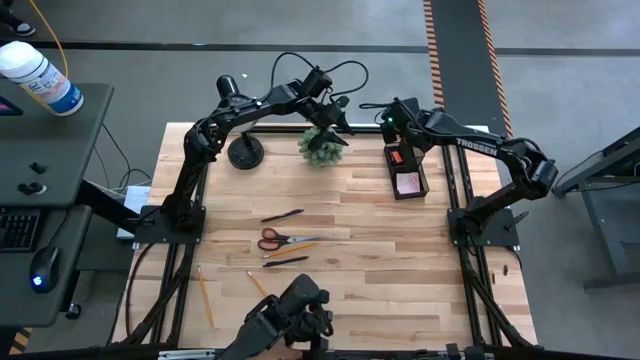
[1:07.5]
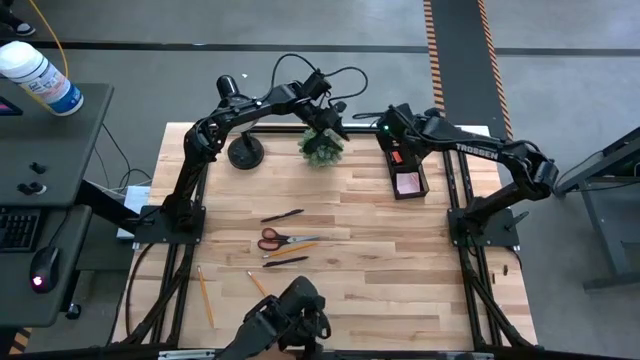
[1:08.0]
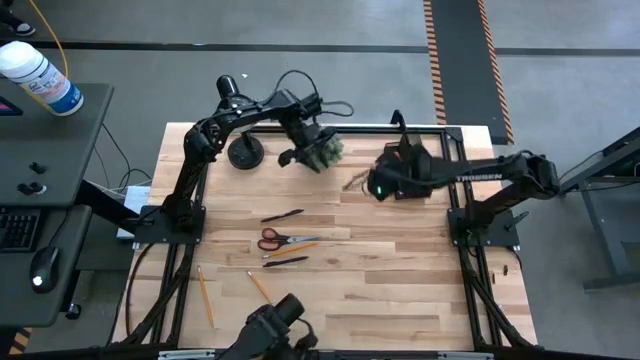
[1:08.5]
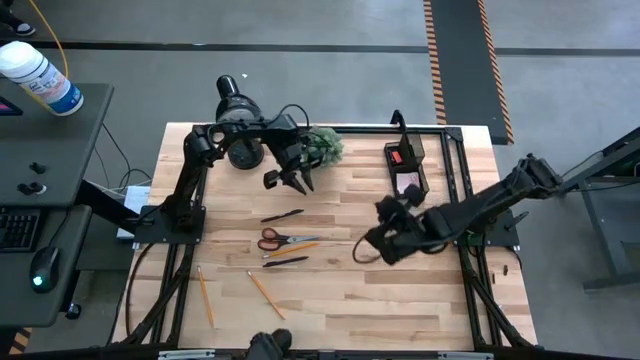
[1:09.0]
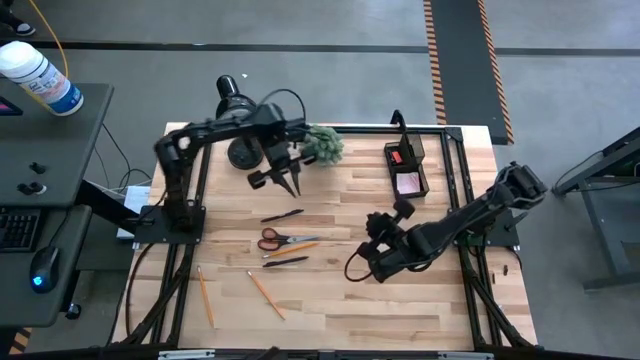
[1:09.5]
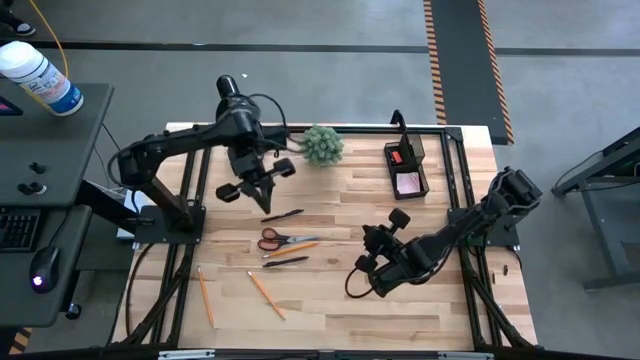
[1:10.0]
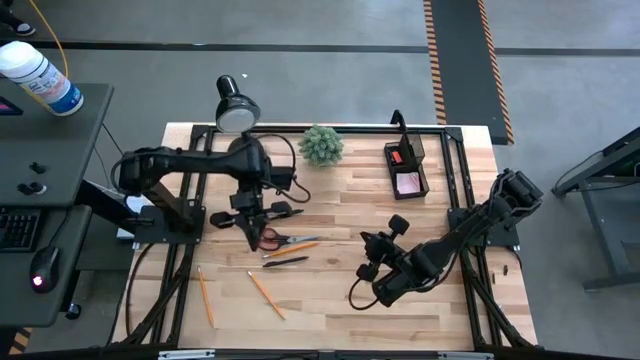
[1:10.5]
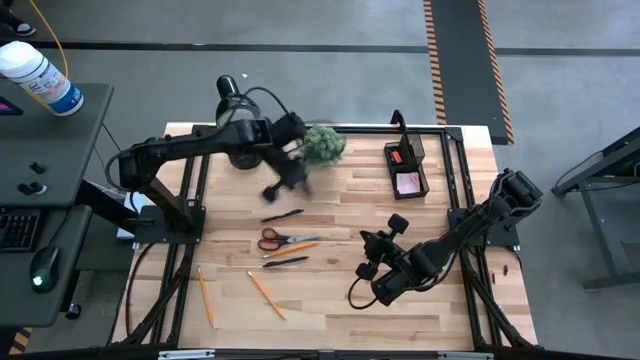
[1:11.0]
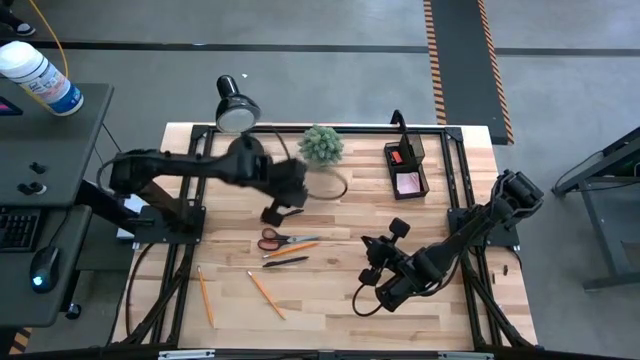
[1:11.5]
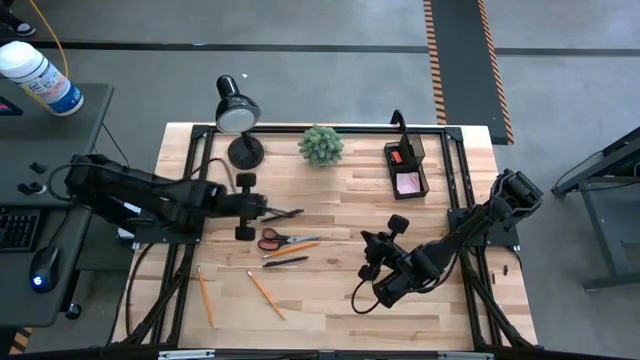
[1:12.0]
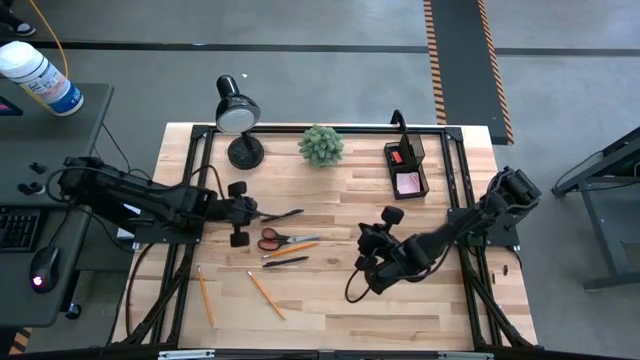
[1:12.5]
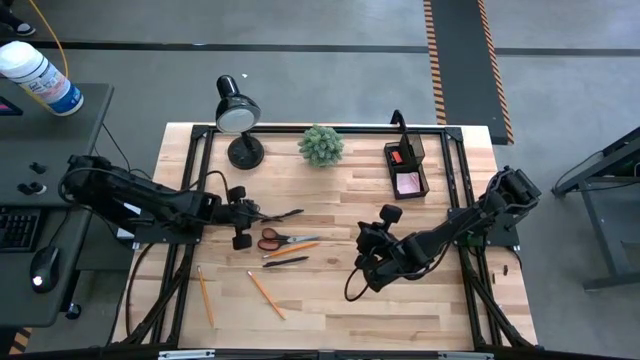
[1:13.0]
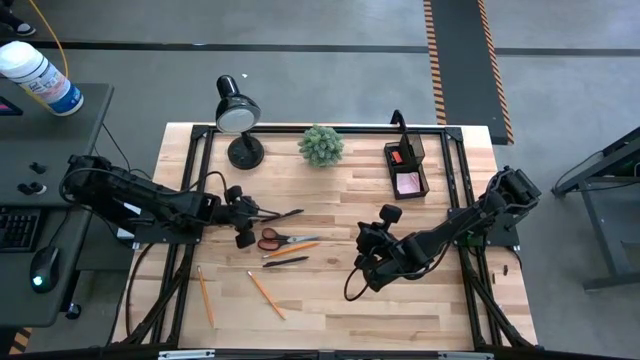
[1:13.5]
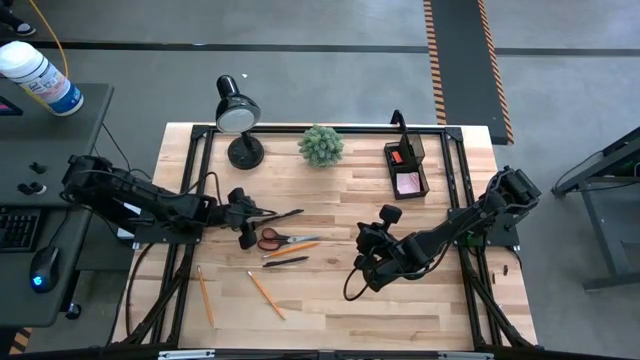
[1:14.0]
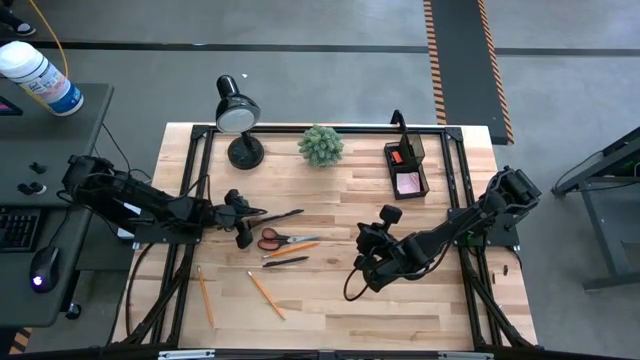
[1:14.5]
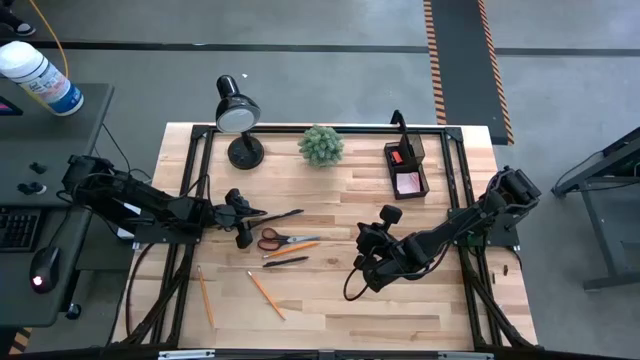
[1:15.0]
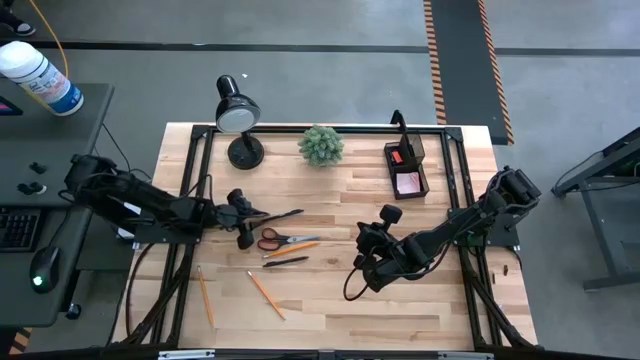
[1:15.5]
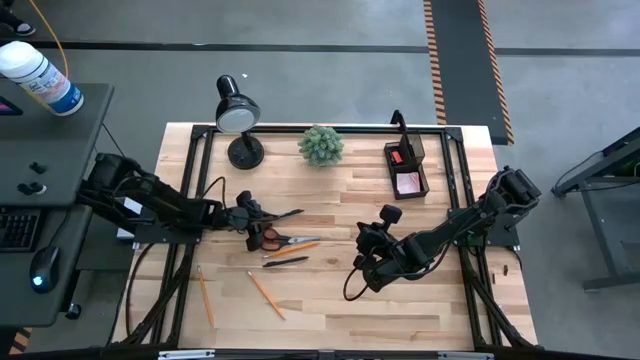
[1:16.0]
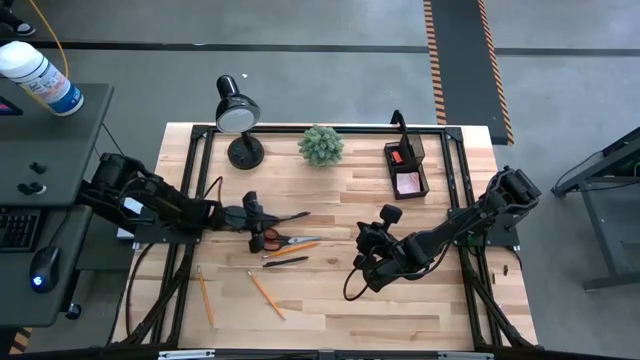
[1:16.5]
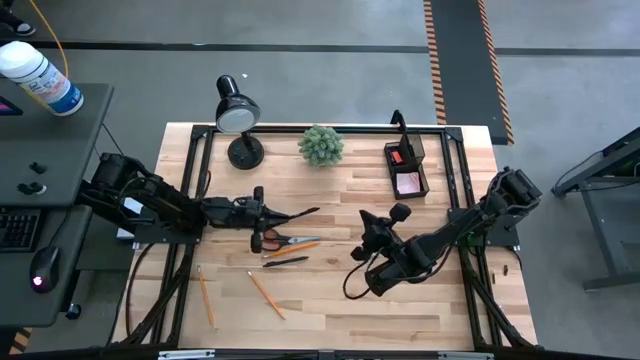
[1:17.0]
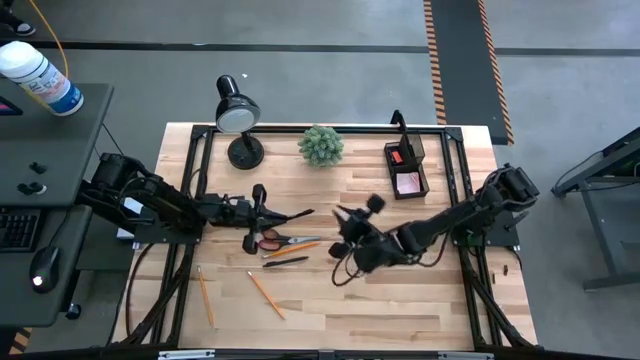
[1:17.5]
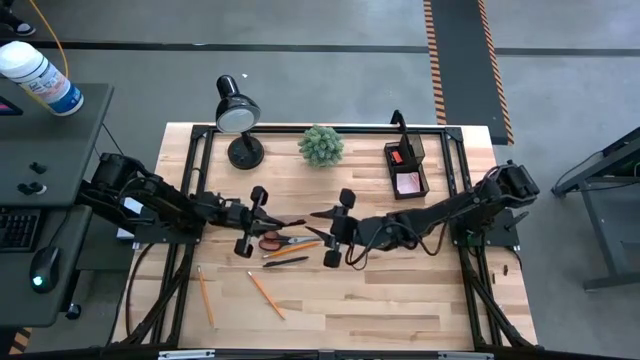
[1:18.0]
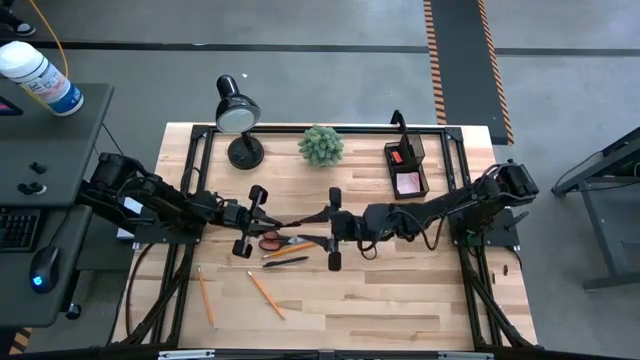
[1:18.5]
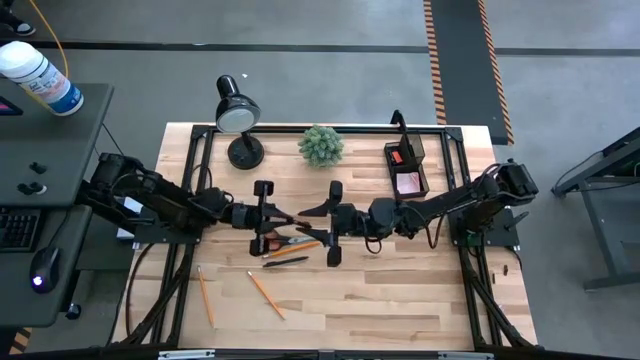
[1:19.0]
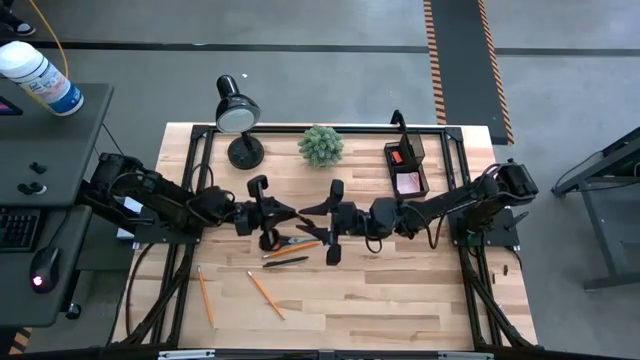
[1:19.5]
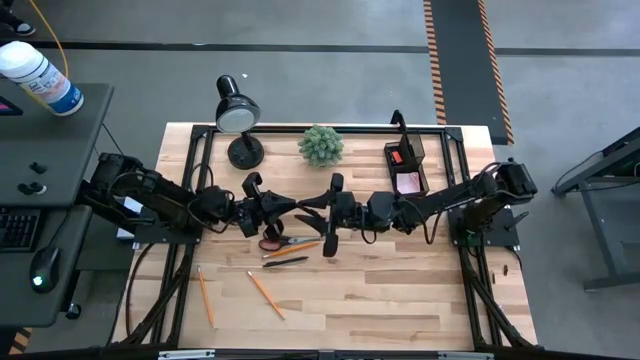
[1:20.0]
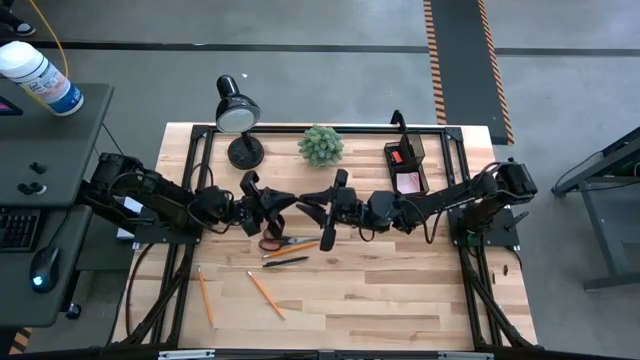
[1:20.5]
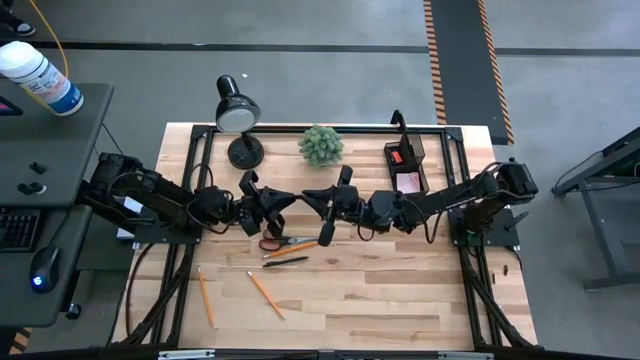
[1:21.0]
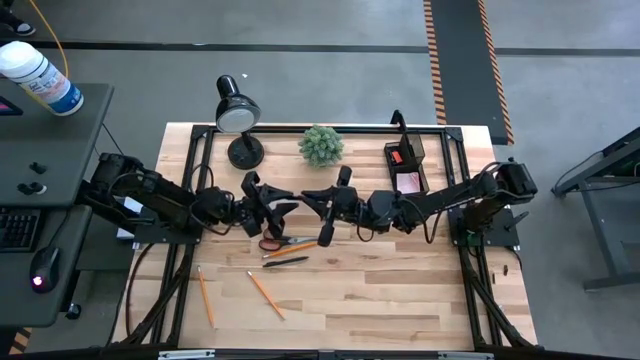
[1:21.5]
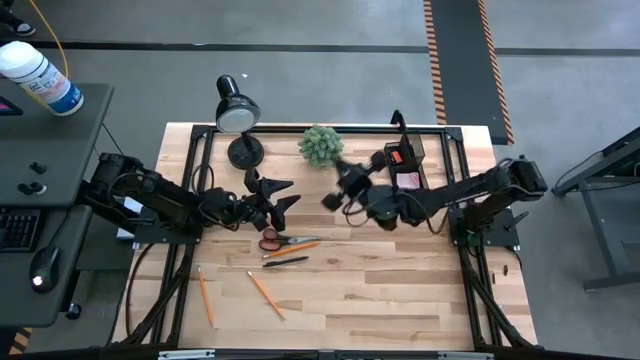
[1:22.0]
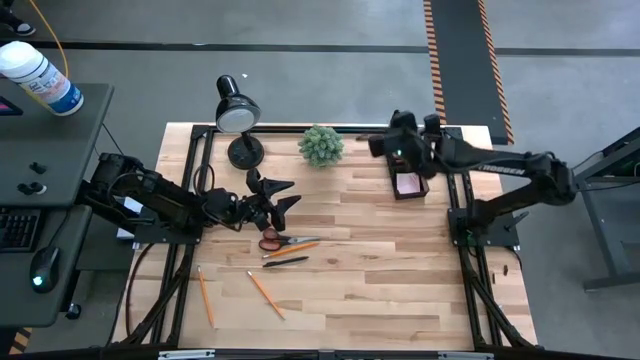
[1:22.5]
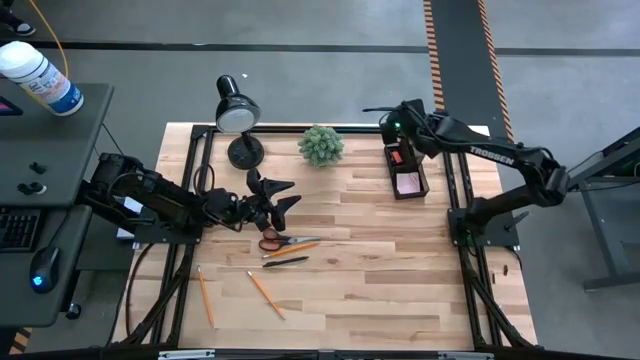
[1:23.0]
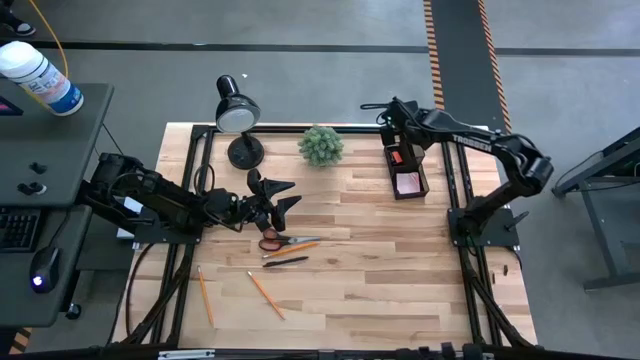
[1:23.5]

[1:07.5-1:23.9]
Task: Pick and place office supplies into organizer
Put the top ballpen into the desk organizer

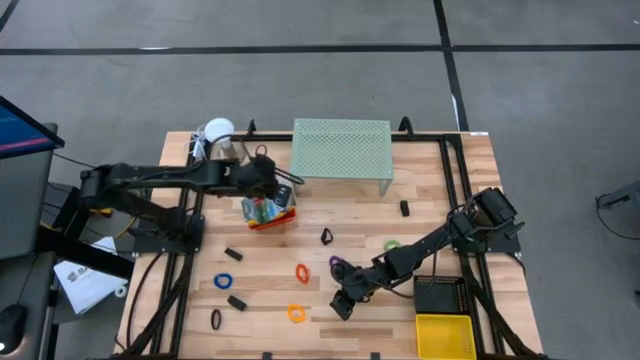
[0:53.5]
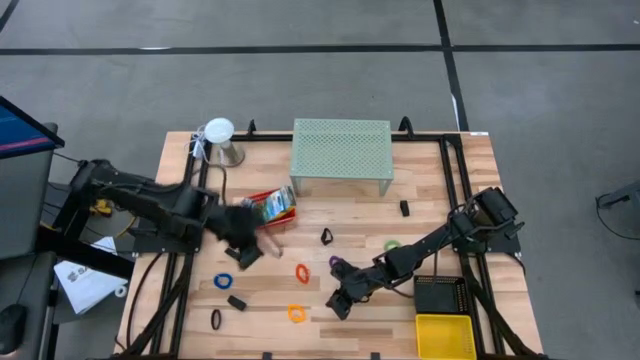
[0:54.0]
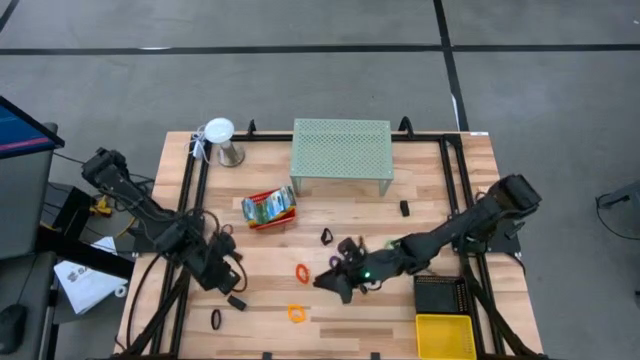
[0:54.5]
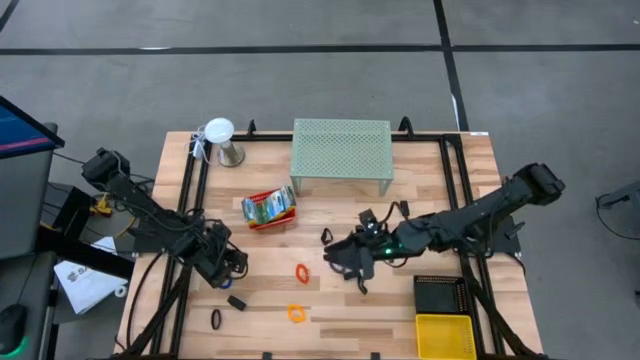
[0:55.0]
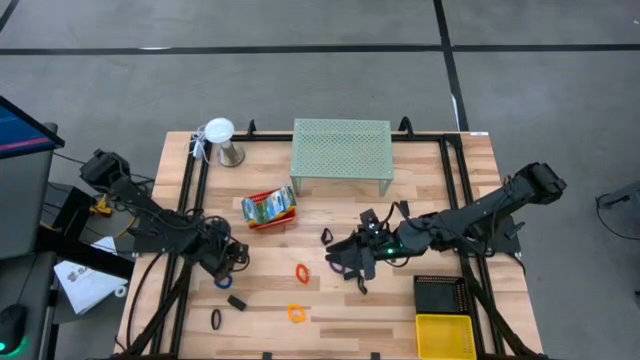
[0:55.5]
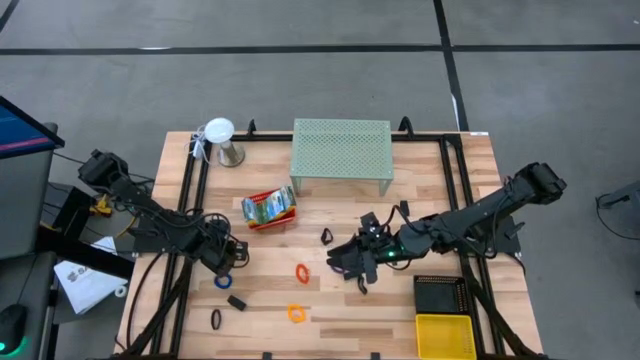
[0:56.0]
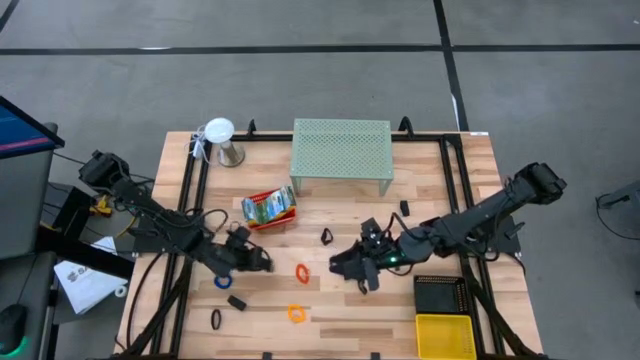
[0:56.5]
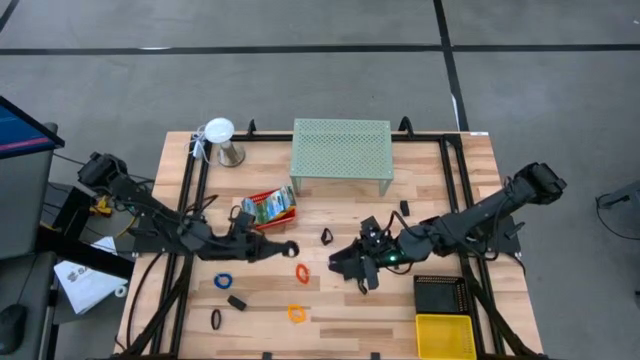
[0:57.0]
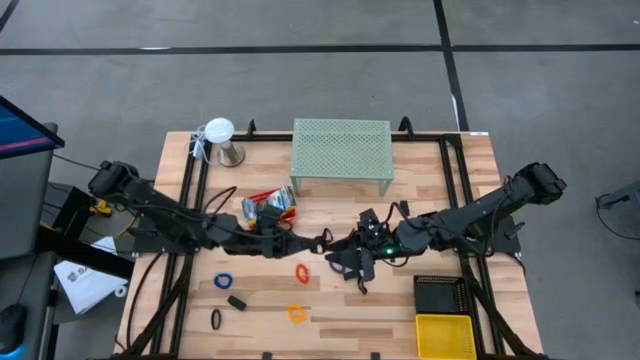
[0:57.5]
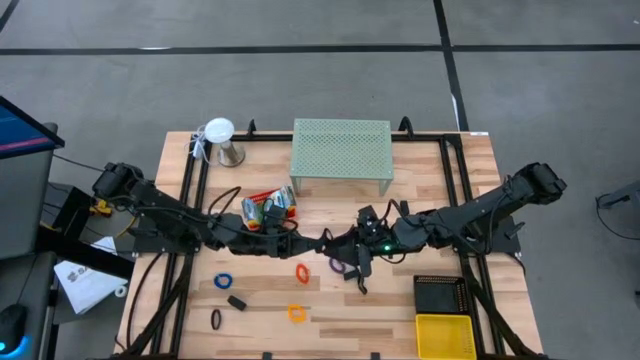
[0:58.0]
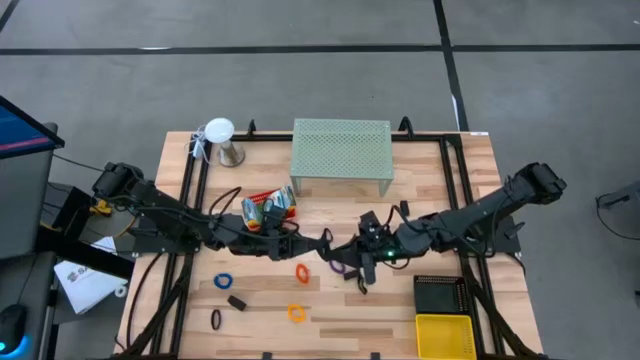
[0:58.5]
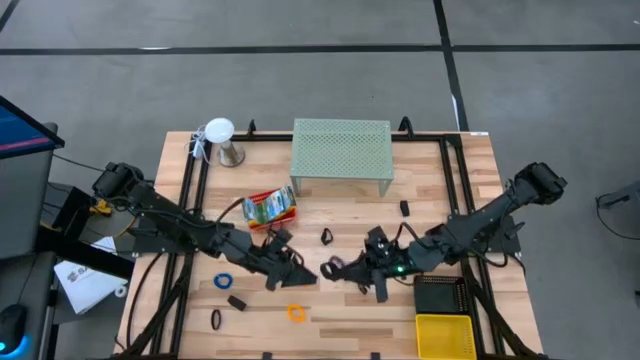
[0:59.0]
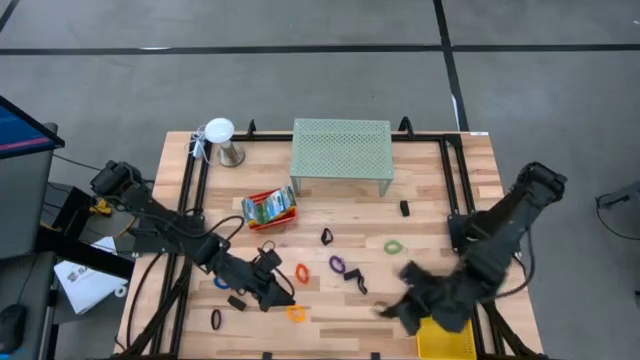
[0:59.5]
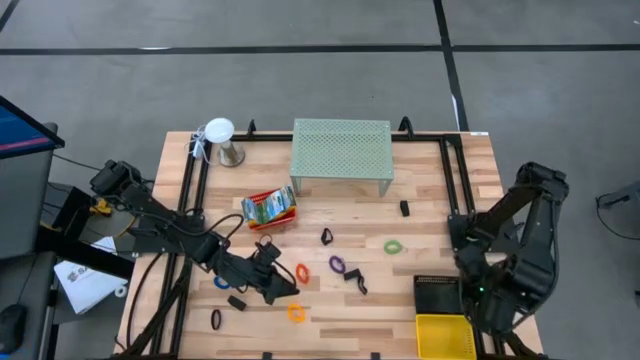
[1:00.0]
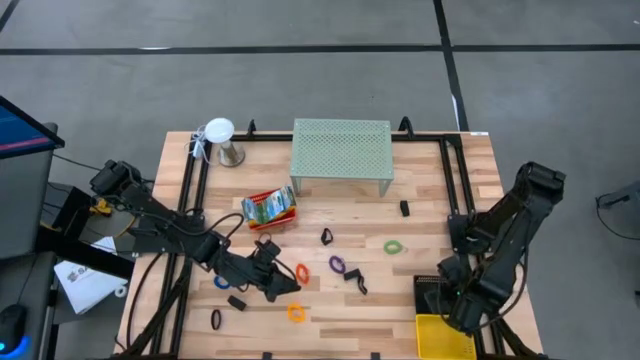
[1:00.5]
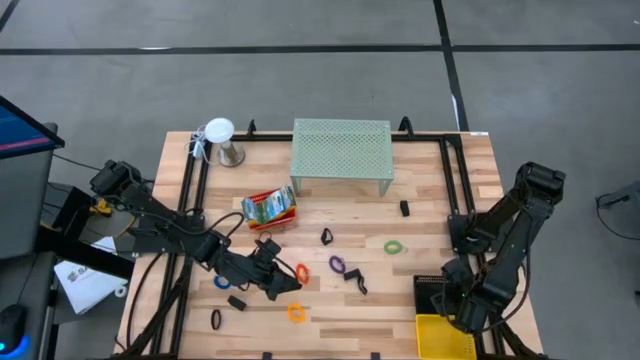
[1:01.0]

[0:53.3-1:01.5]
Task: Pick & Place Office Desk Supplies
Put the black rubber band into the black bin
